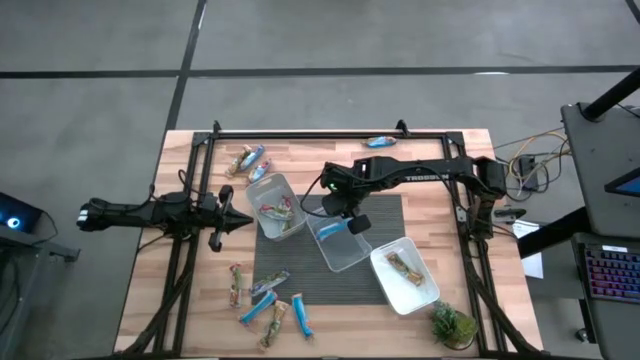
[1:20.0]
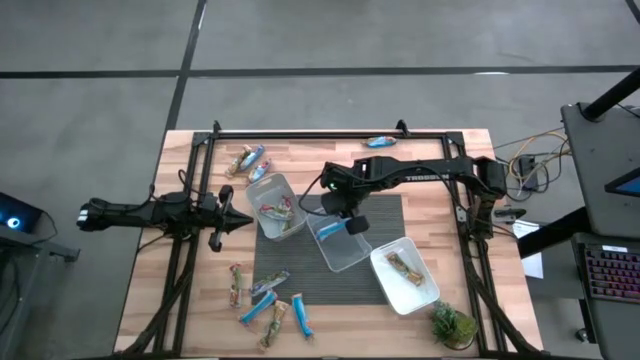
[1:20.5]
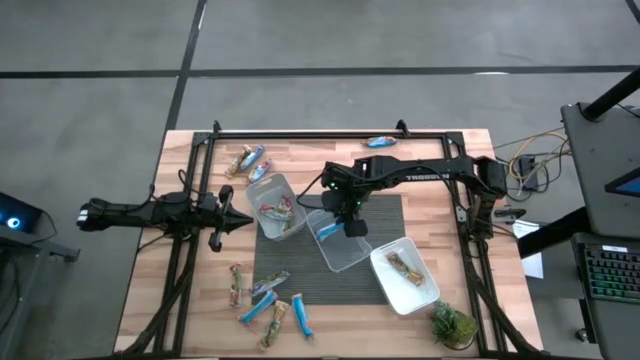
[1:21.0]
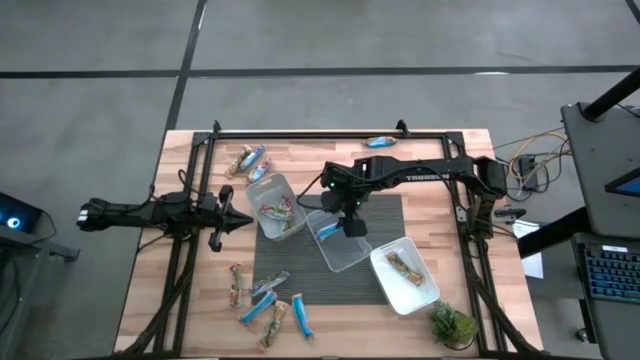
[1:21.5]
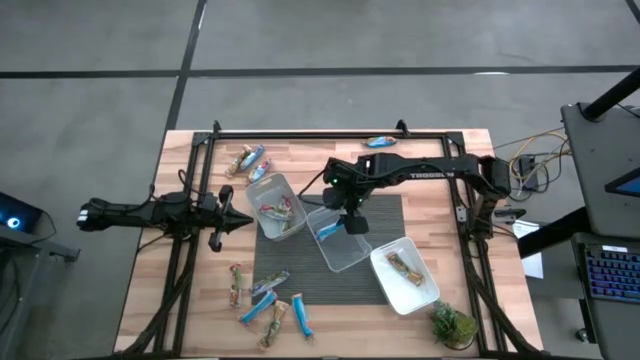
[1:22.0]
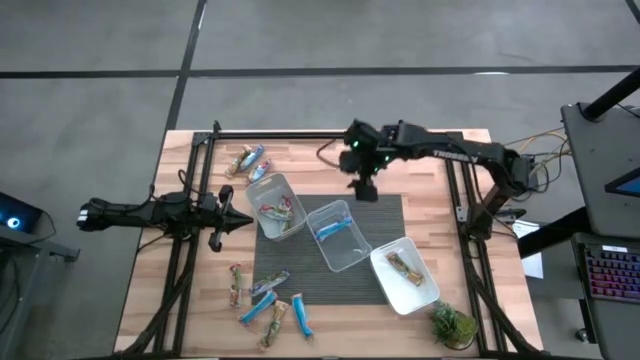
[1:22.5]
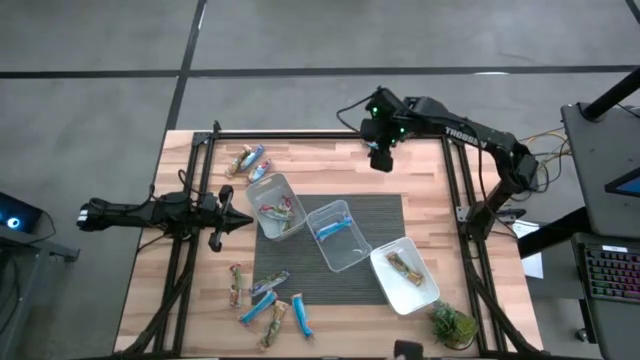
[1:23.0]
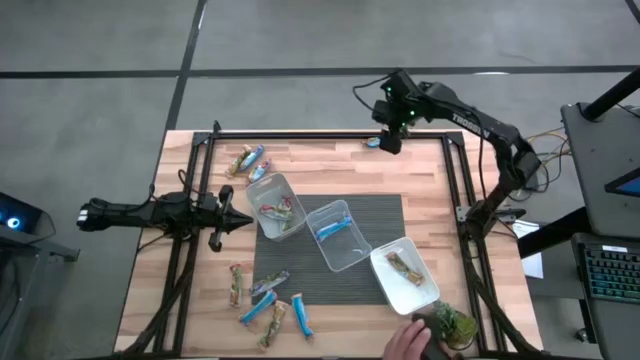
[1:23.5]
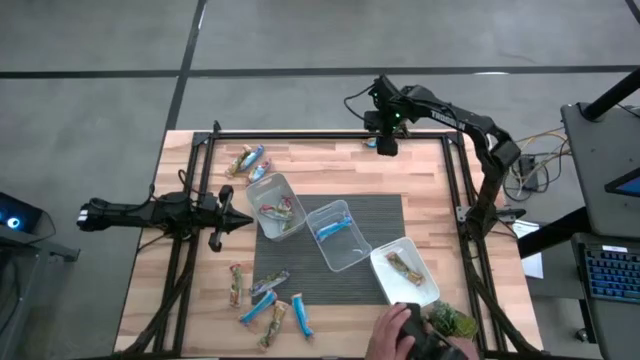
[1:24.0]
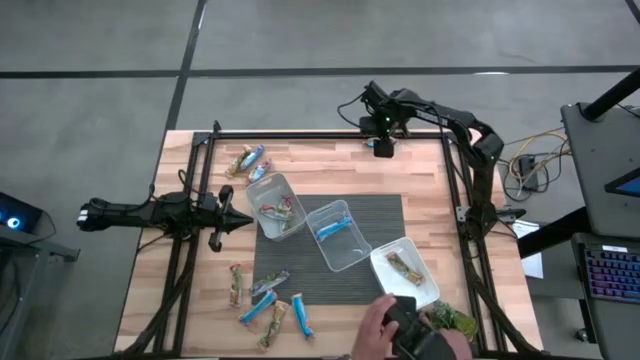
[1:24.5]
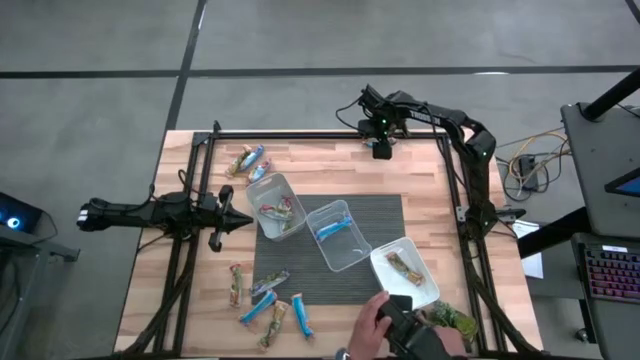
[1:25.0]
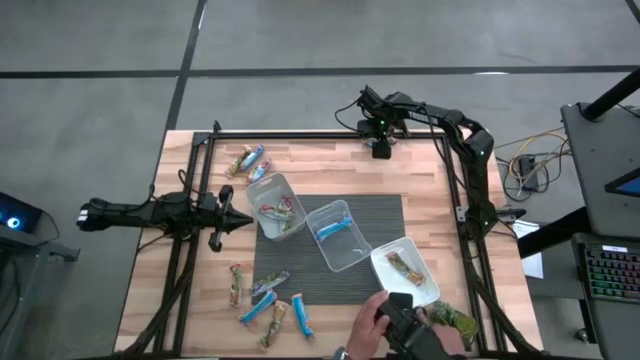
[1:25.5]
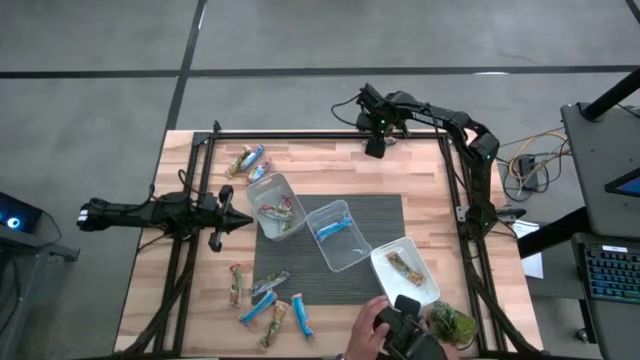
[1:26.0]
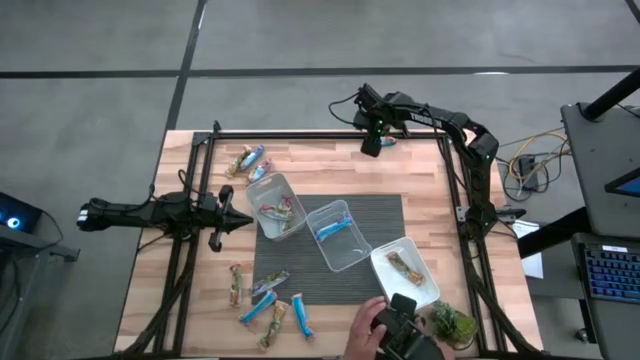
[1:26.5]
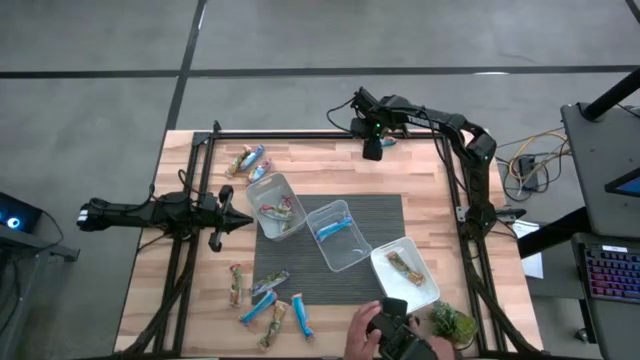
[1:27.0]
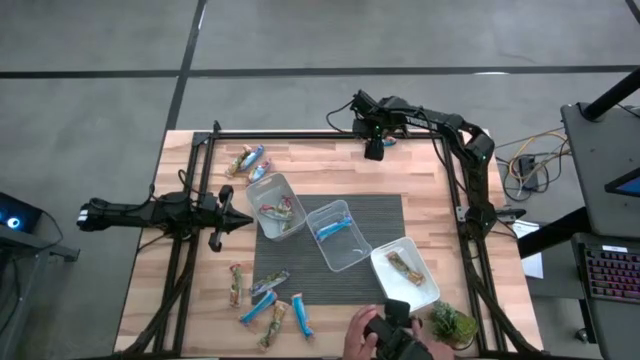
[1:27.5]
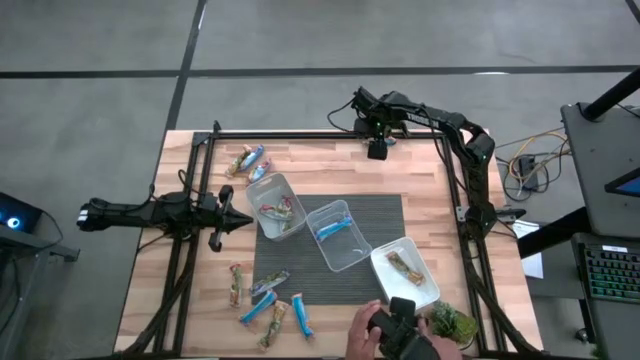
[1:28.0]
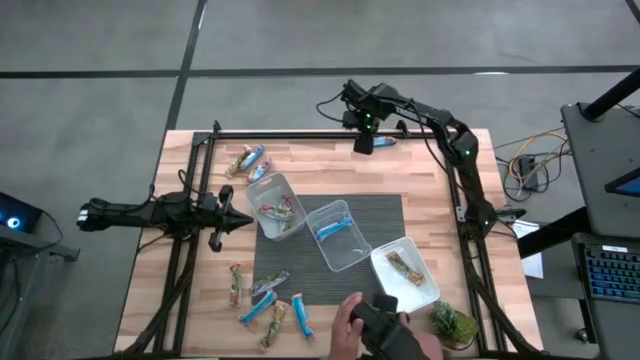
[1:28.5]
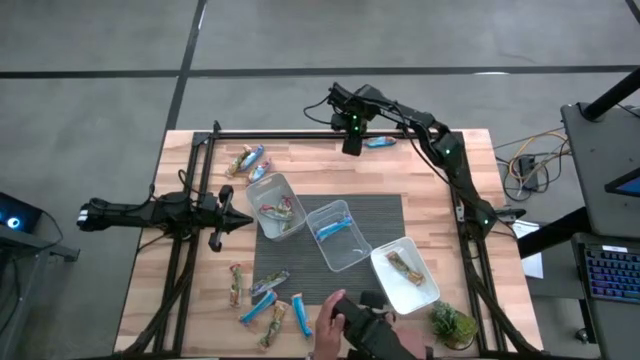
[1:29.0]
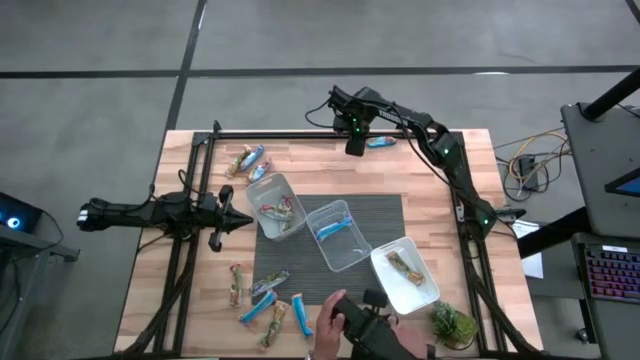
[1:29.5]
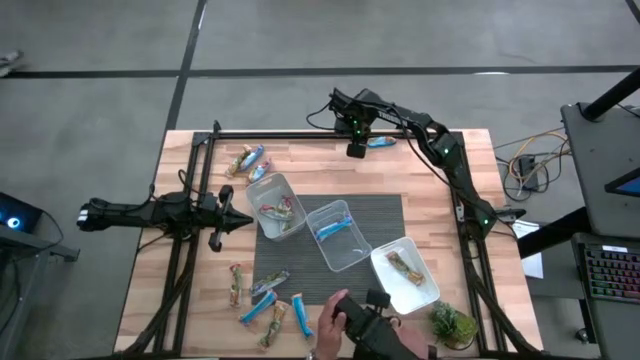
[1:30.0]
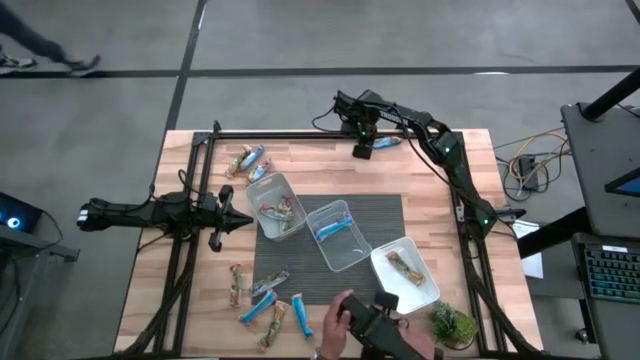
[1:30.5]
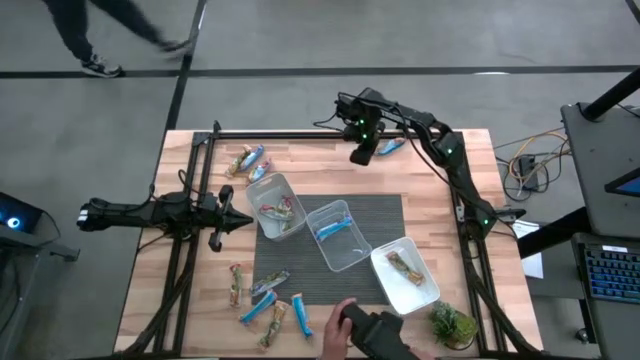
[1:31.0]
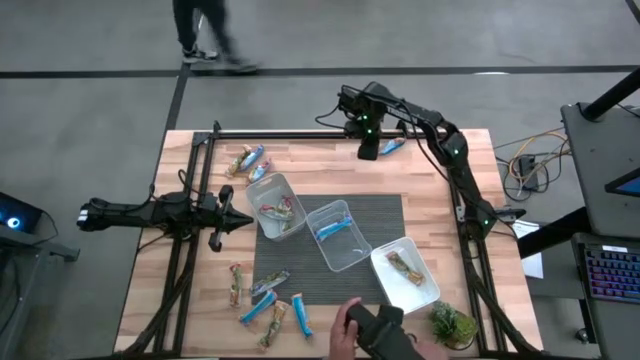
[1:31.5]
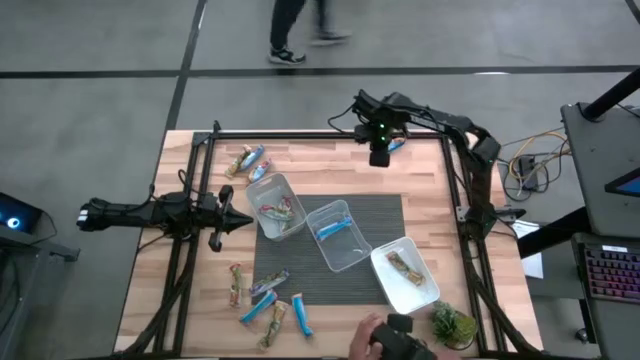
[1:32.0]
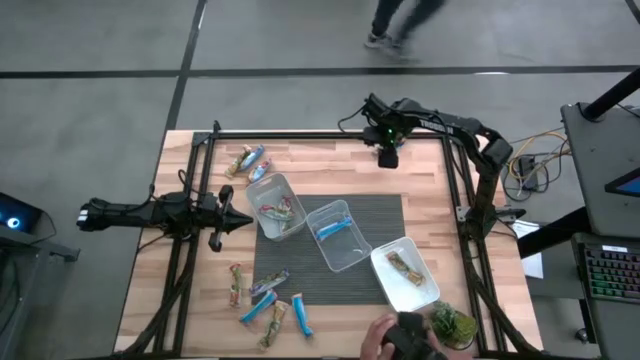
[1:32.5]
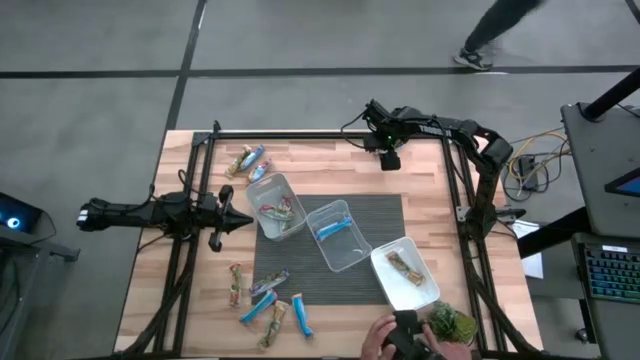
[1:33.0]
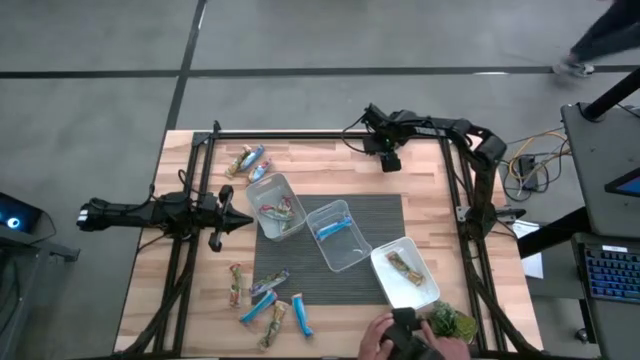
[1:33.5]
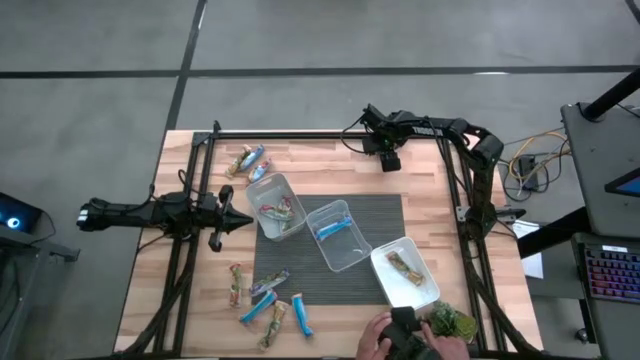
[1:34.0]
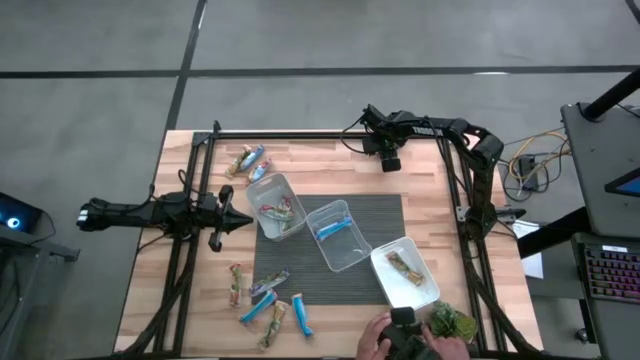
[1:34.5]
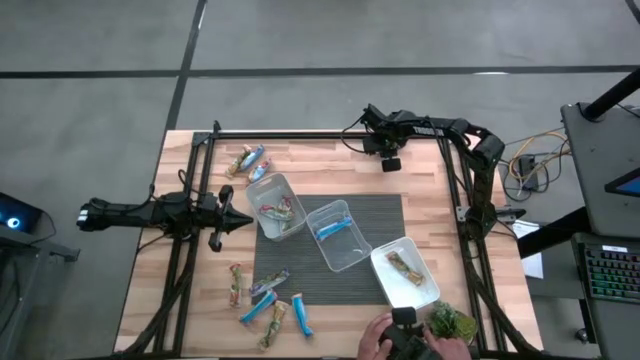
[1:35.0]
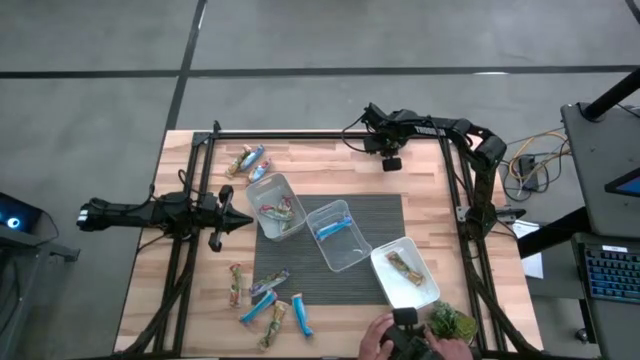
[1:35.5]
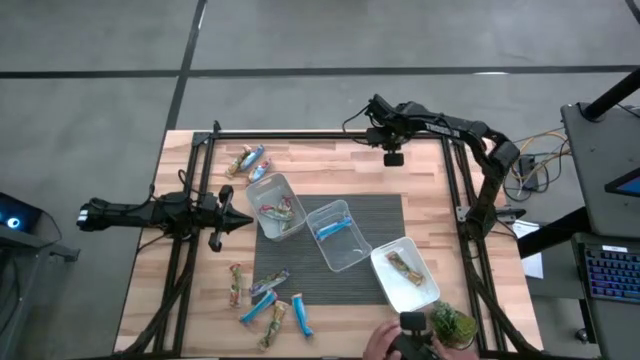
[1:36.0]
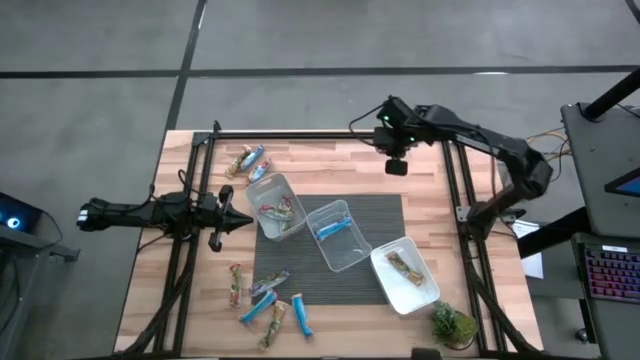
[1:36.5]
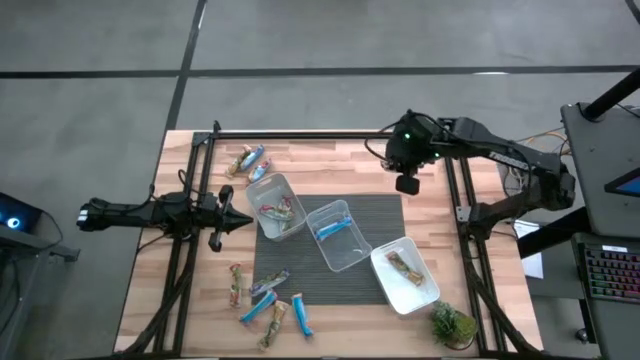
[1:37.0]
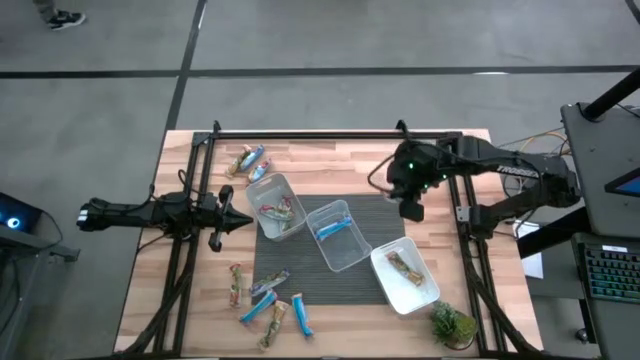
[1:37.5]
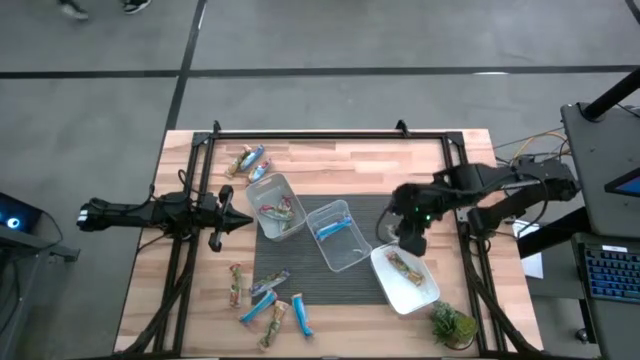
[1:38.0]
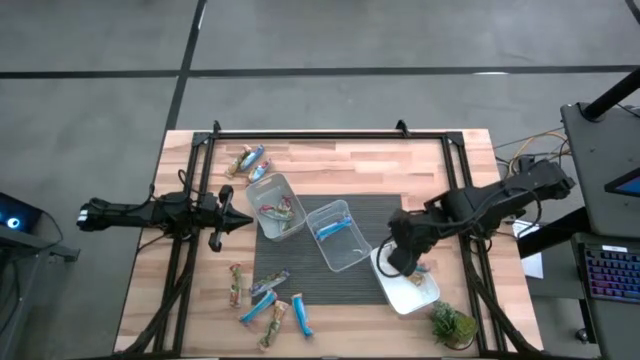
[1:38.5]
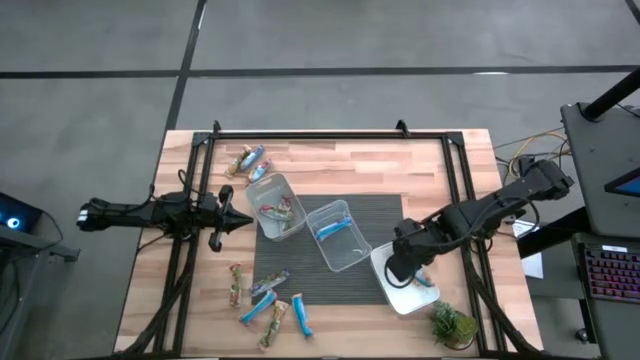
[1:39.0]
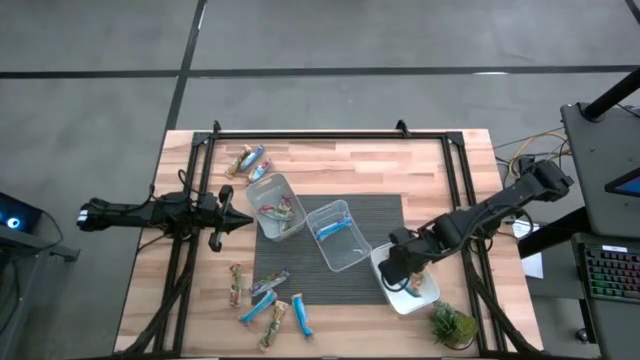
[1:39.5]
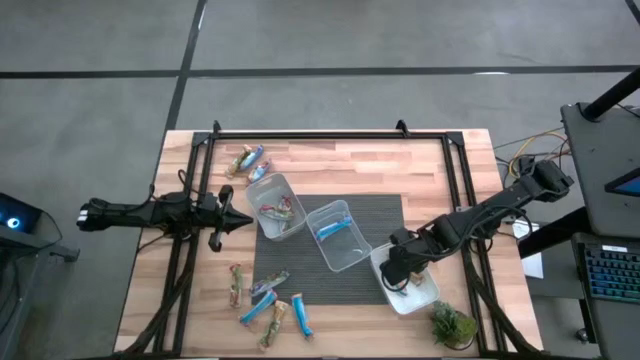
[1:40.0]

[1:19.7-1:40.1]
Task: Pick and place Granola Bars by type
Put the yellow granola bar into the white bin

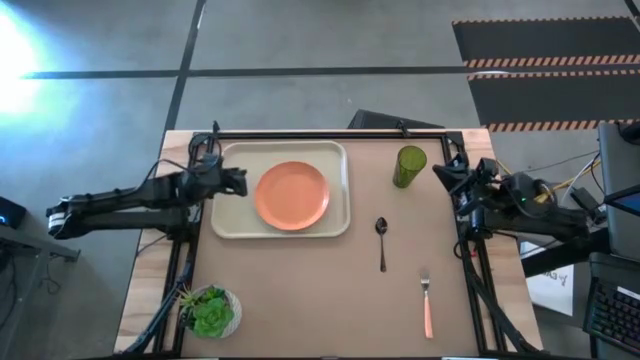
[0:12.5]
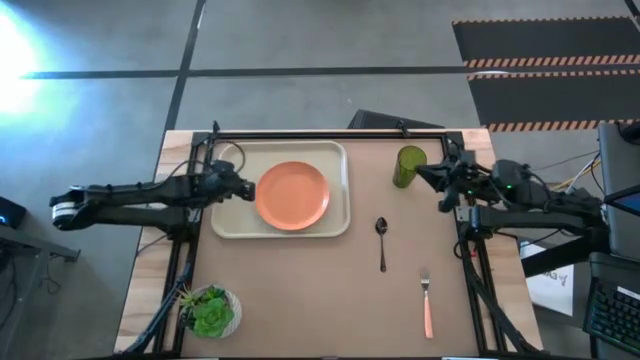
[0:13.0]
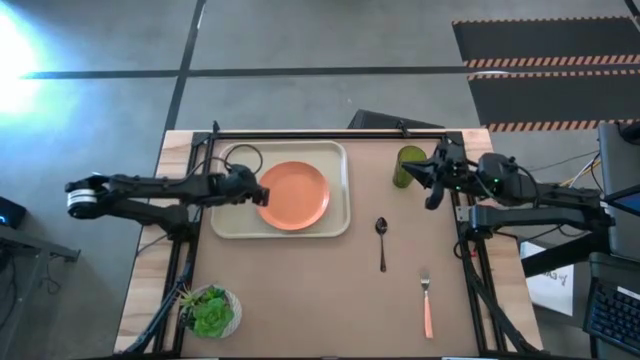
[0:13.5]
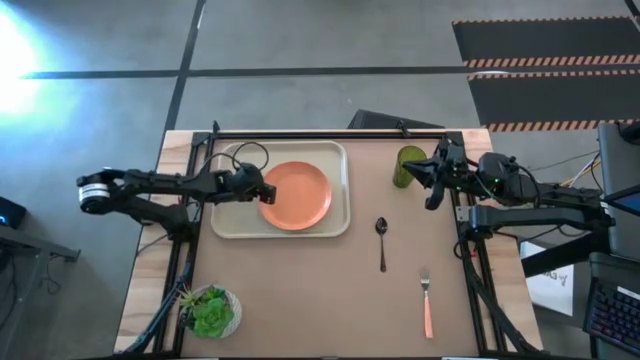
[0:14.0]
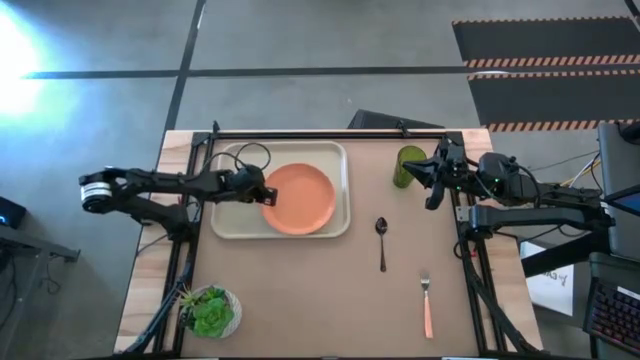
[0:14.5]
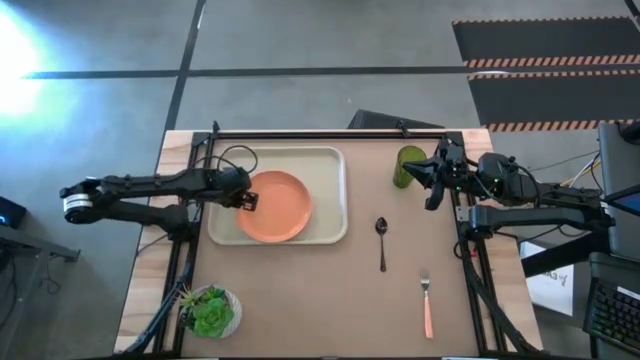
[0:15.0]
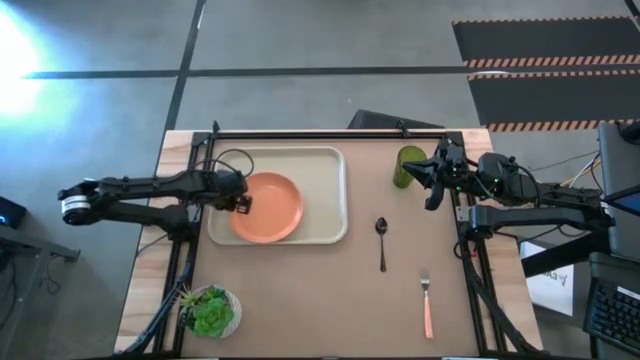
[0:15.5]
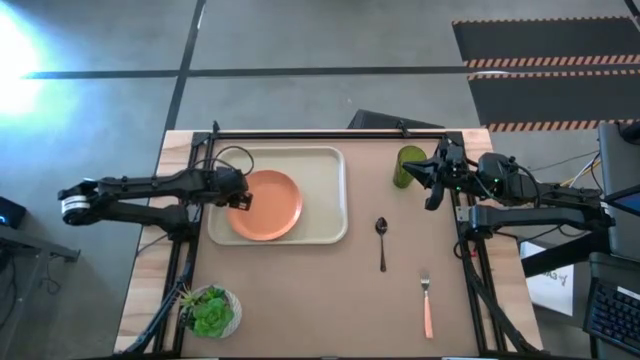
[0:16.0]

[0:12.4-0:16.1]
Task: Pick and place plate/cup/fork/spoon on tray
Put the orange plate on the bottom left of the white serving tray
